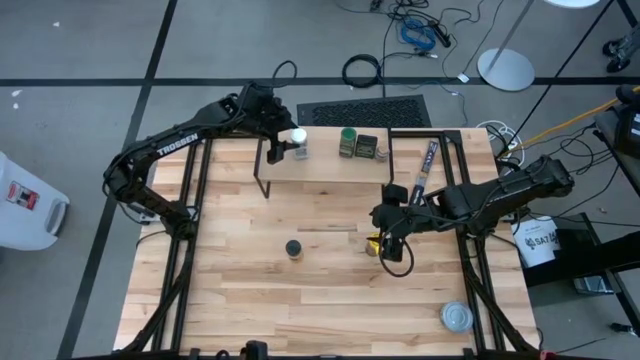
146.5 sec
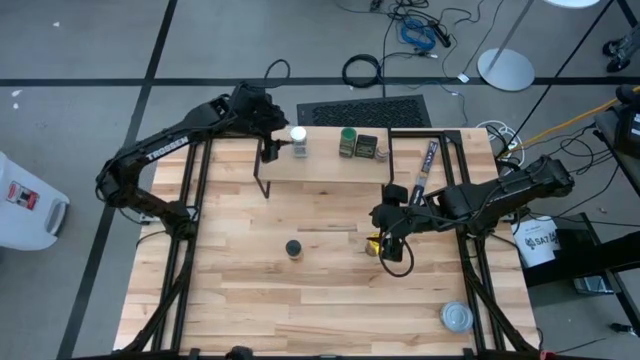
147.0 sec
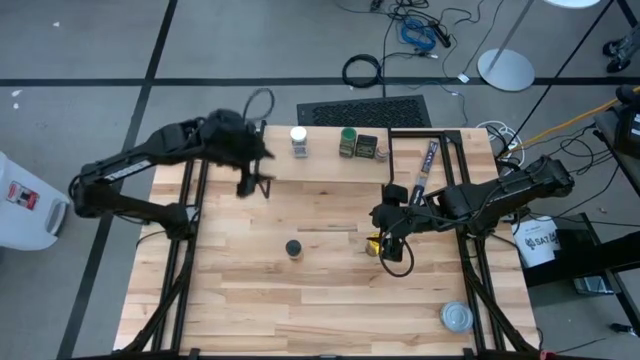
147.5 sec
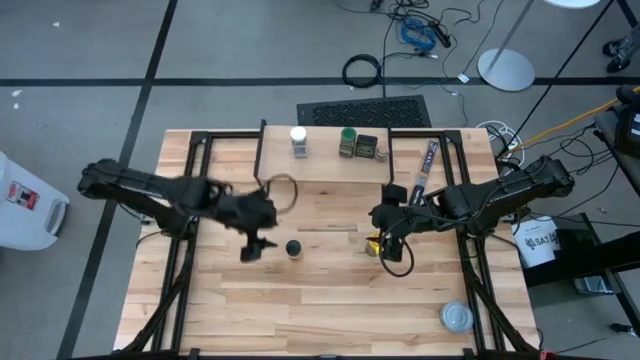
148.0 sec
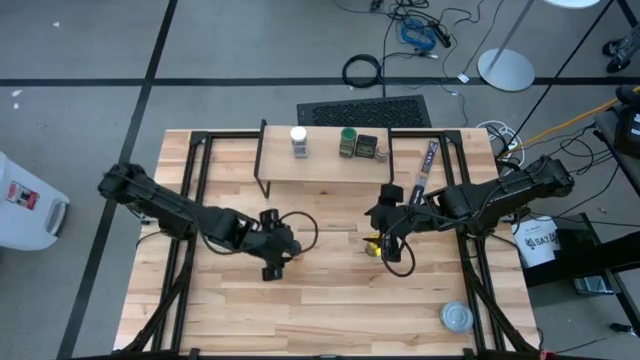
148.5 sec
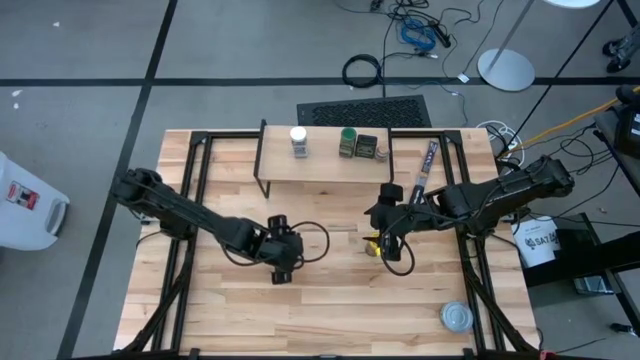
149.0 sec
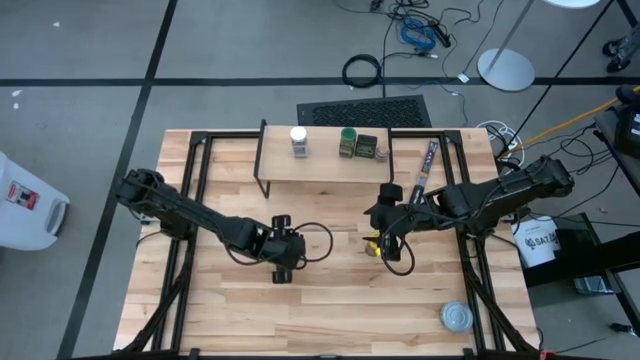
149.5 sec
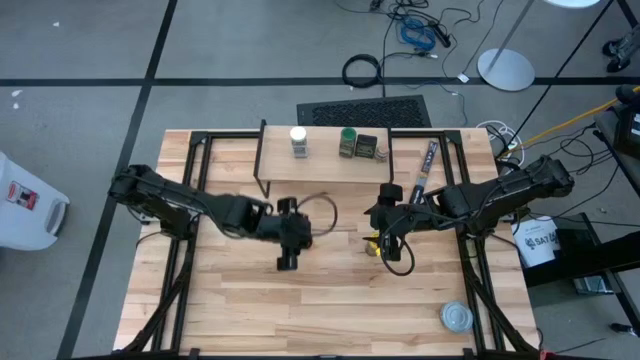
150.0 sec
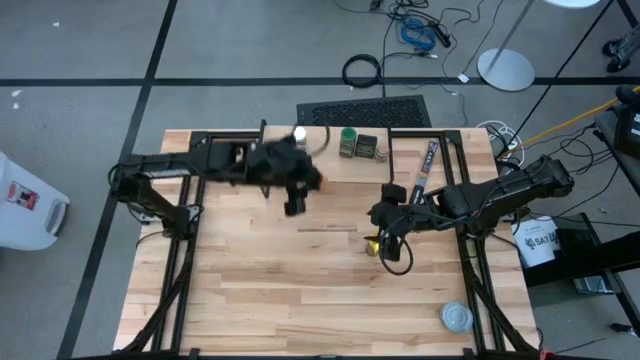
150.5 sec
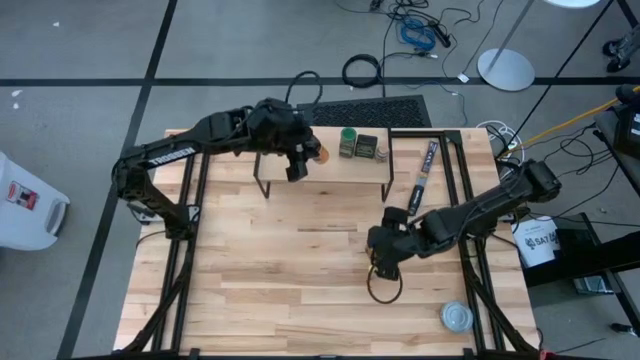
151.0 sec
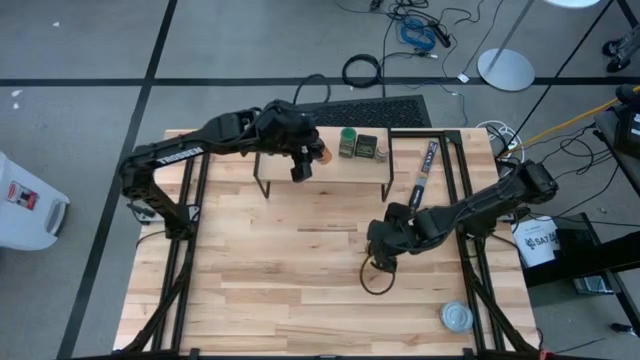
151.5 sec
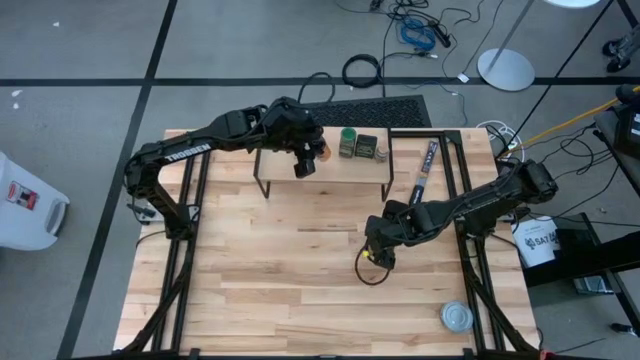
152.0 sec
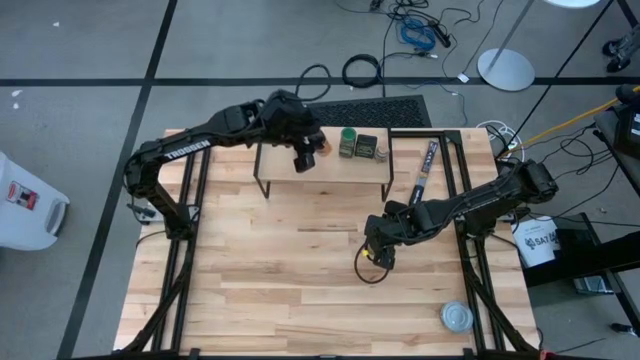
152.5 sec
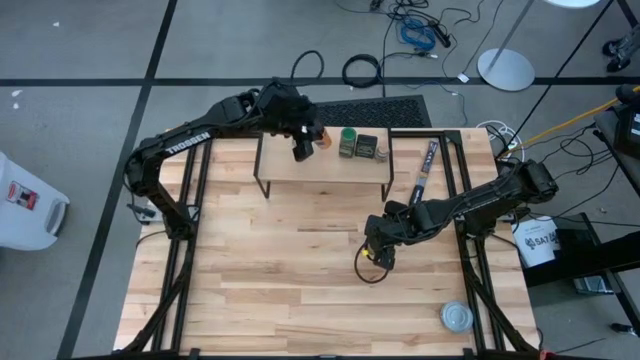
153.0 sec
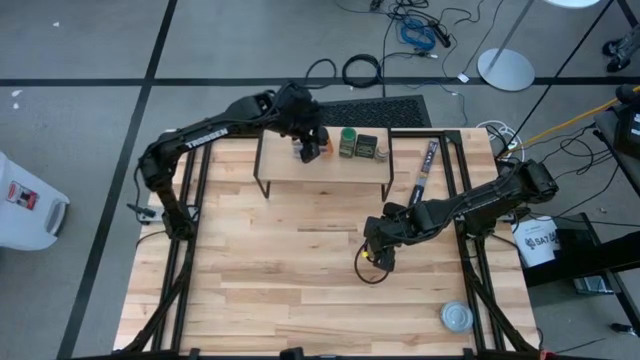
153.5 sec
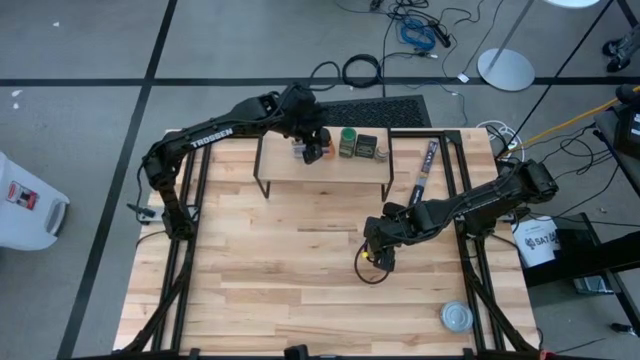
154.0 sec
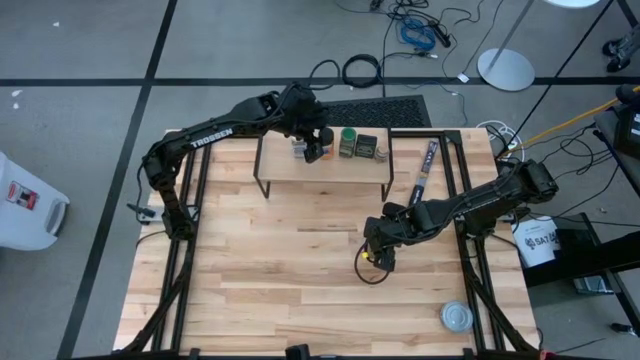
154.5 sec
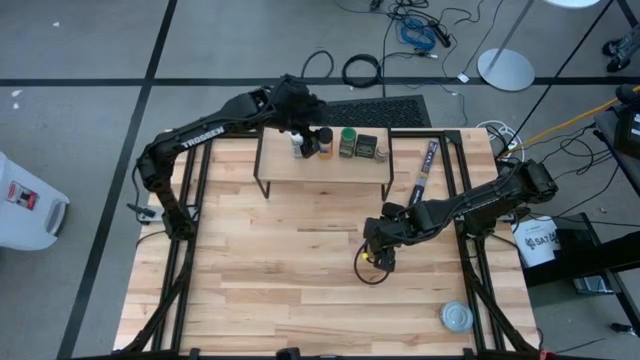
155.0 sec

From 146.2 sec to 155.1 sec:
Task: Shelf spices
Put the black seasoning bottle on the shelf

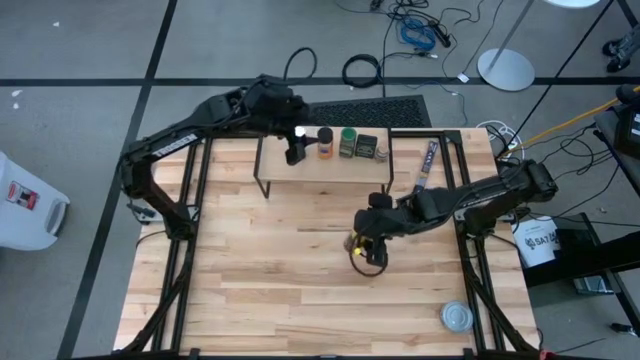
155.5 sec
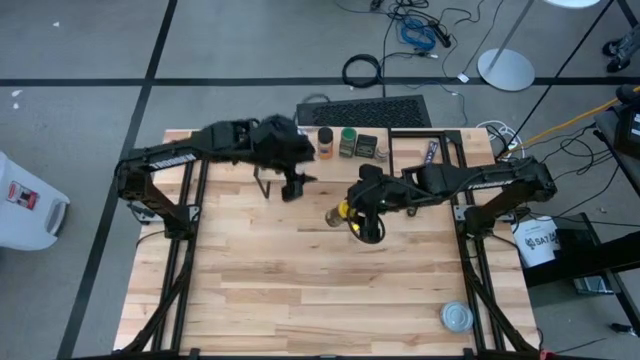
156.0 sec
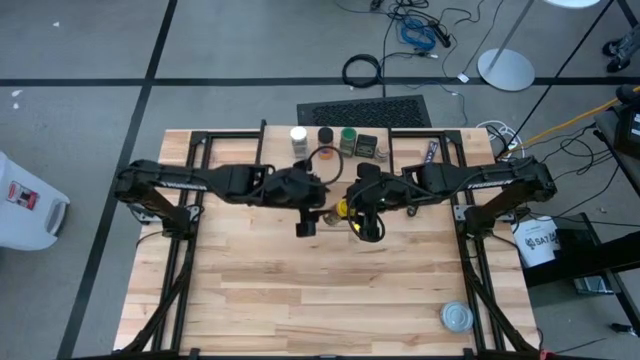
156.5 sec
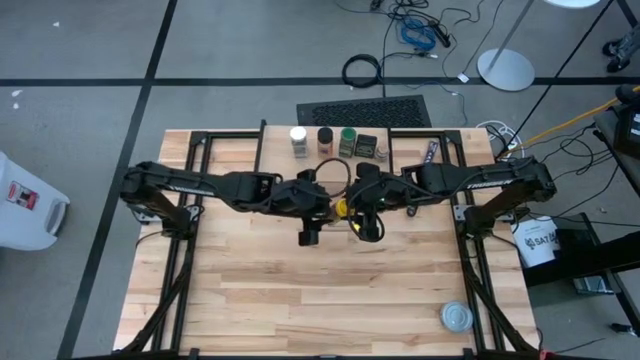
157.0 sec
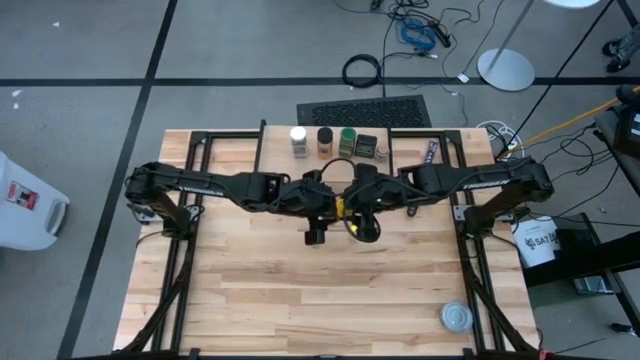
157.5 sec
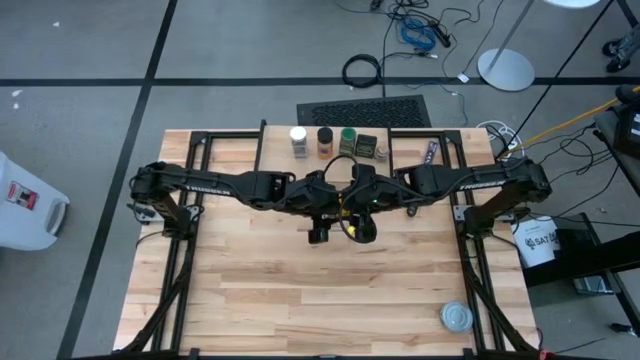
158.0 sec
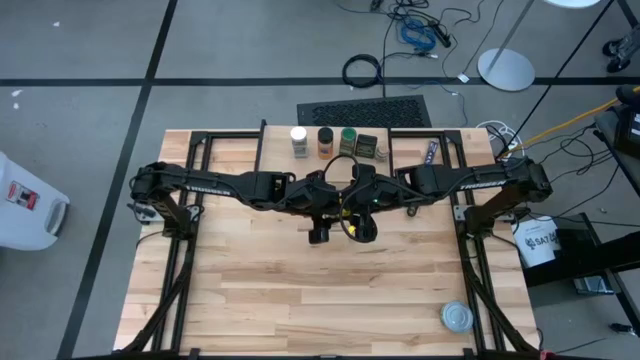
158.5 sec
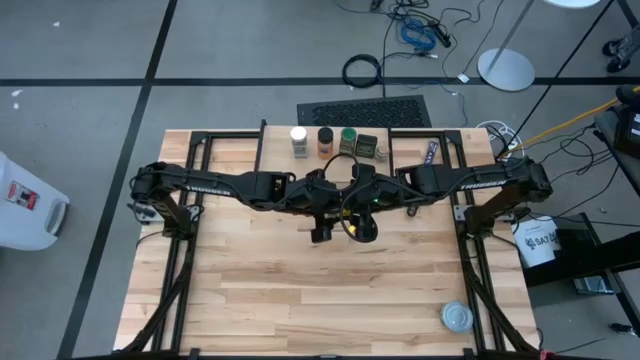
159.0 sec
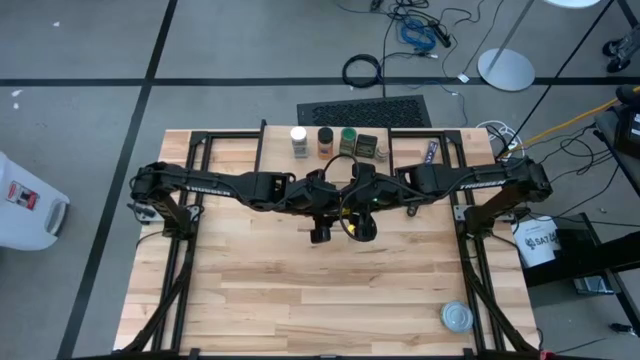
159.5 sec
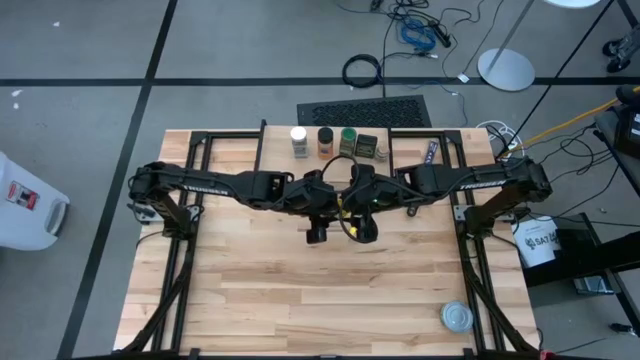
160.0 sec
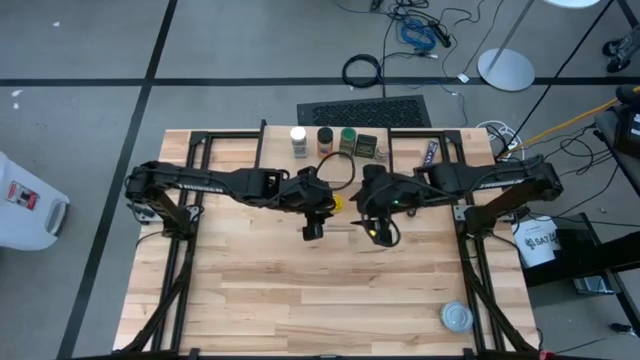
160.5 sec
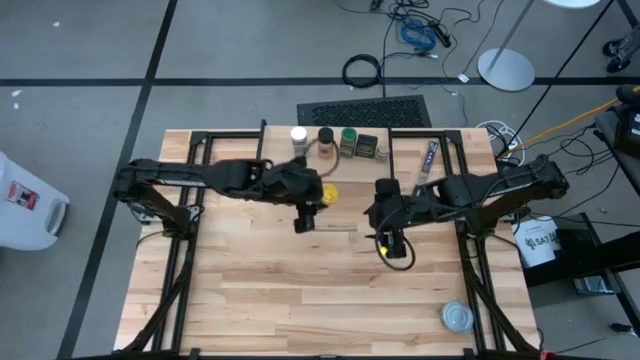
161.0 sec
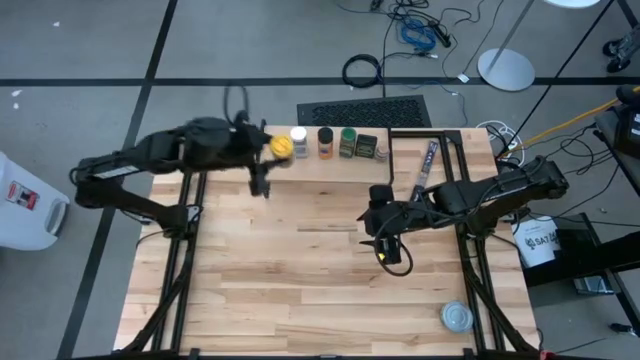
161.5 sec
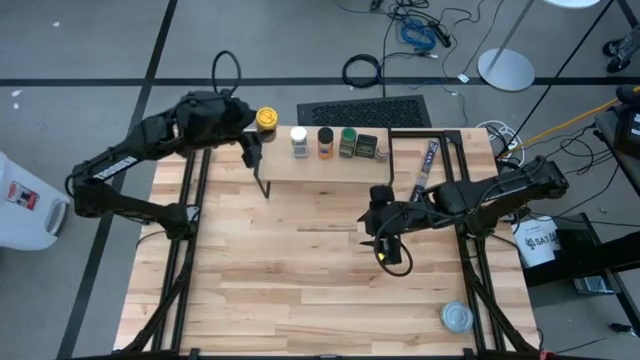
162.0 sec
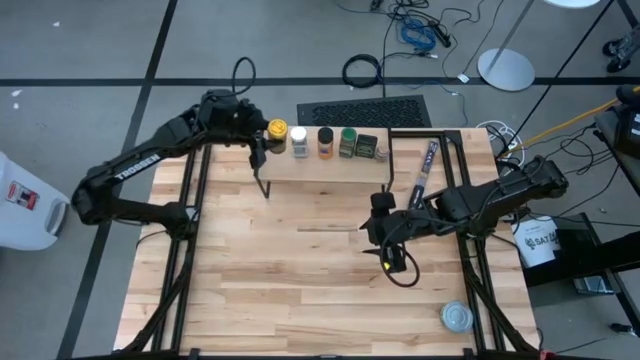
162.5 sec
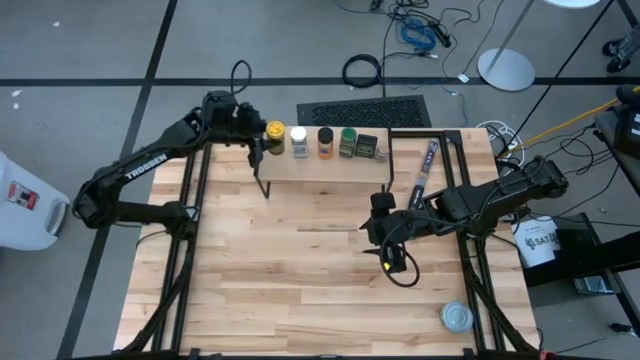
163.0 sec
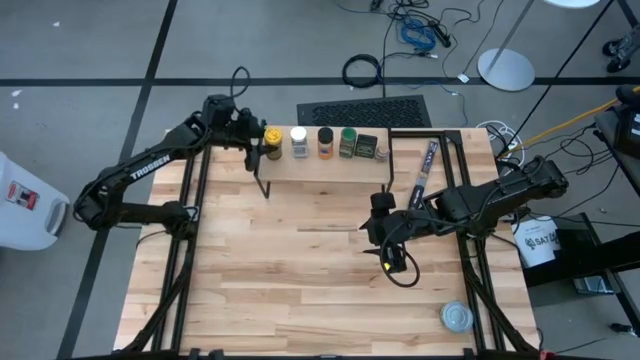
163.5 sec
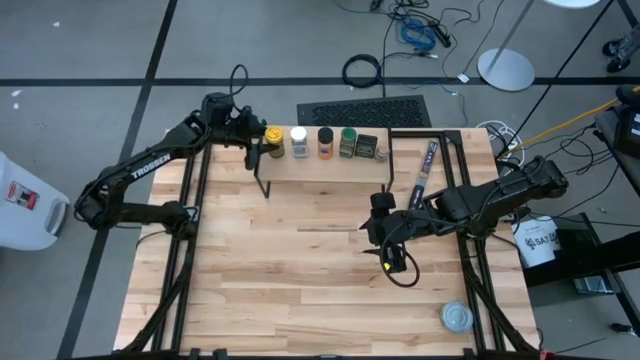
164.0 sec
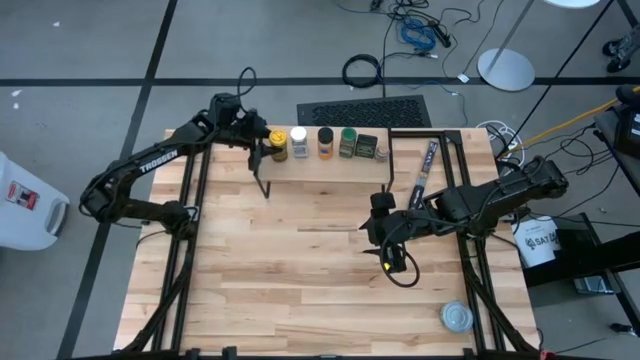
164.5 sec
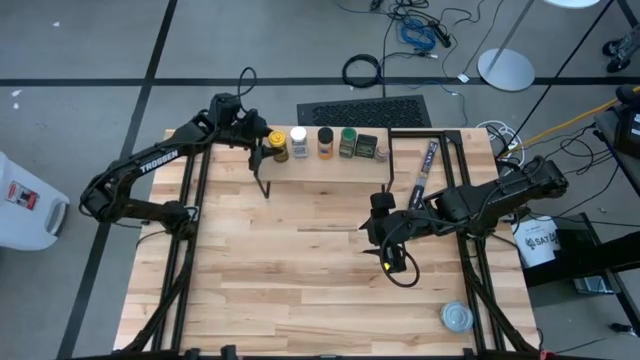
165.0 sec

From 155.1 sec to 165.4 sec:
Put the yellow seasoning bottle on the shelf

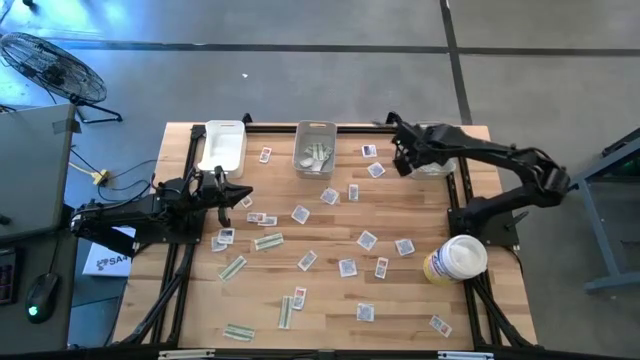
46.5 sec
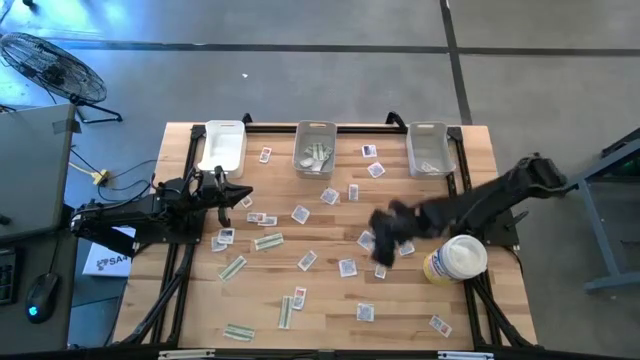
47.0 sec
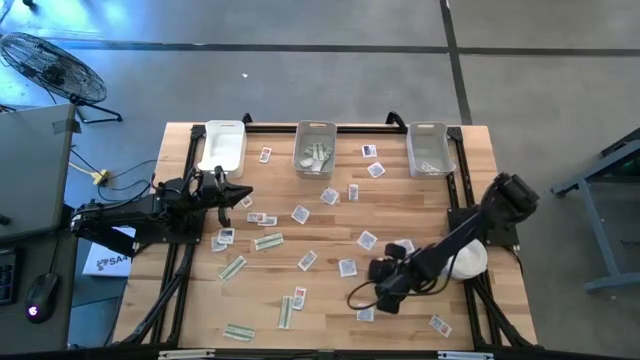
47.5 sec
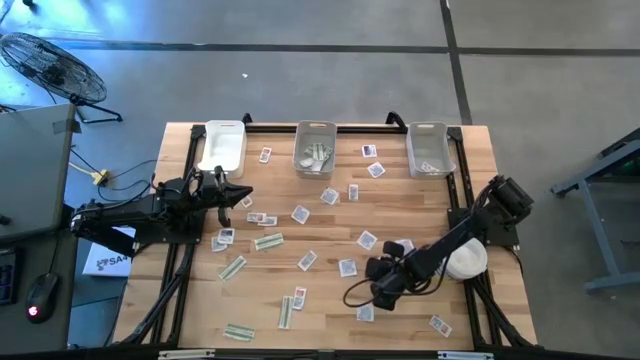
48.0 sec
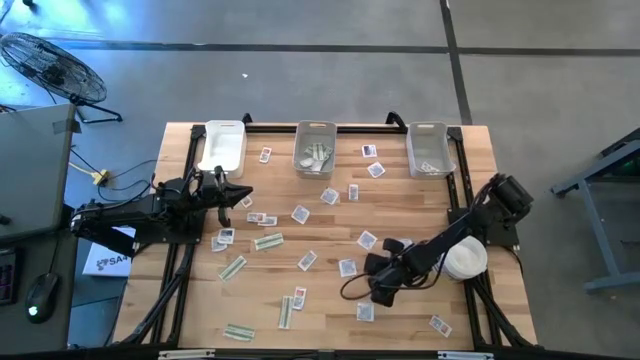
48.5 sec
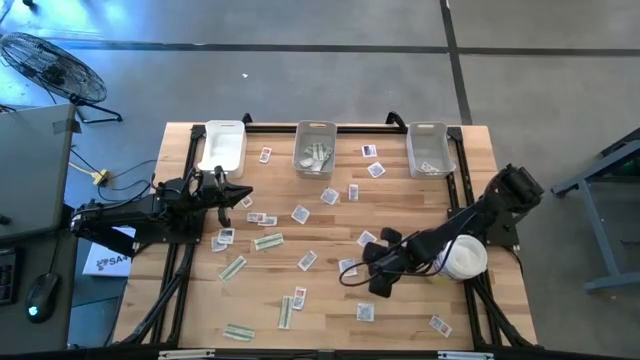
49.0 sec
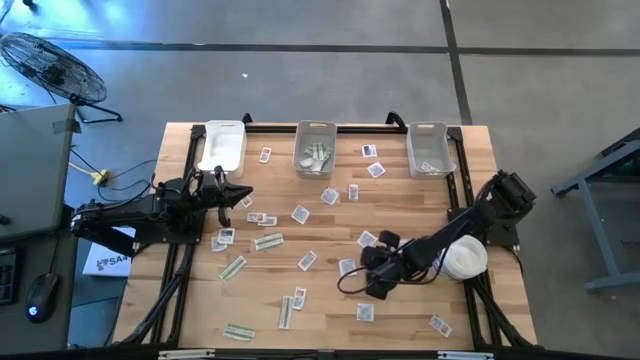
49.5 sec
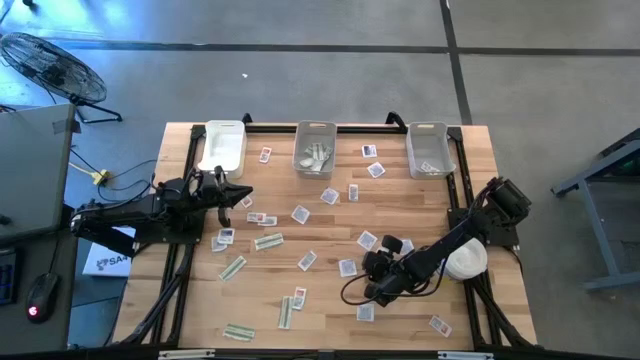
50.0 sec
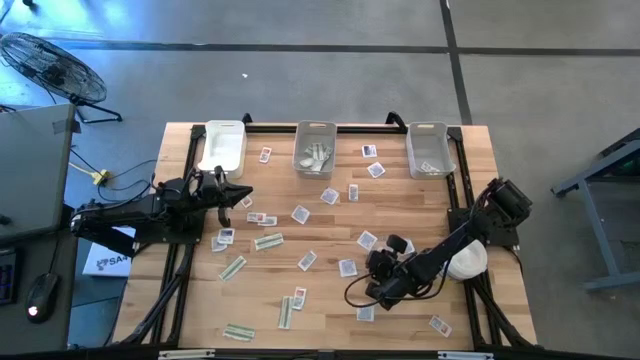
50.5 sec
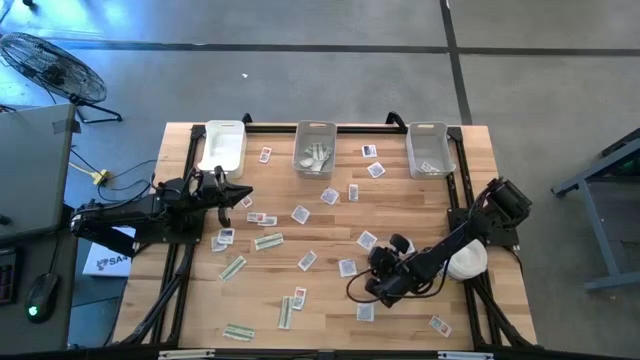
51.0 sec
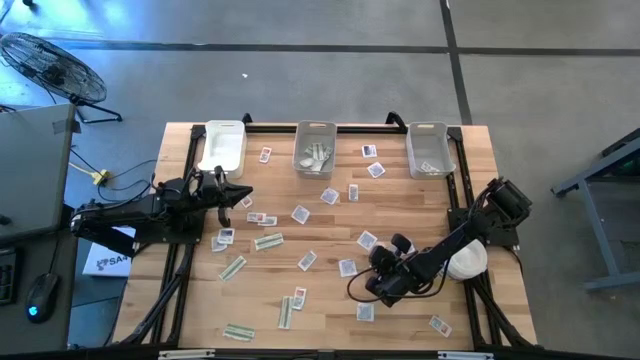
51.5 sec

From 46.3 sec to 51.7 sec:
Task: Pick & Place First Aid Supplies
Put the orange pad into the right gray bin
